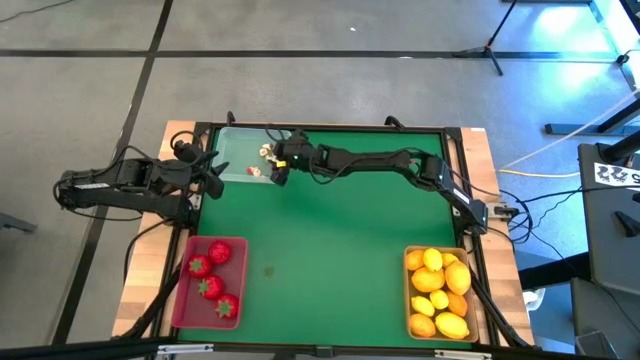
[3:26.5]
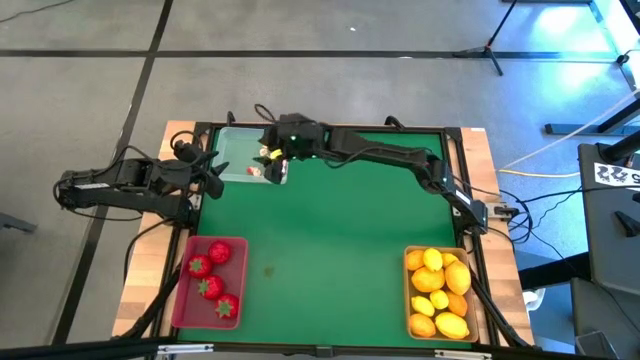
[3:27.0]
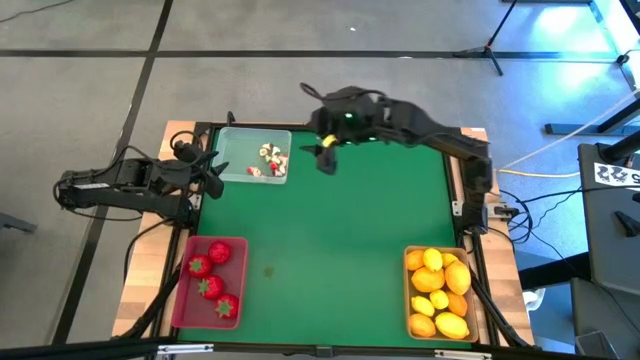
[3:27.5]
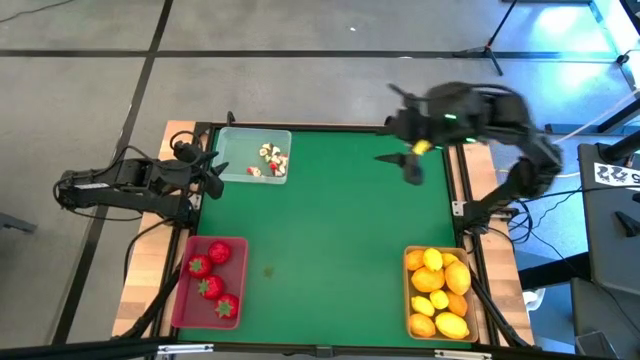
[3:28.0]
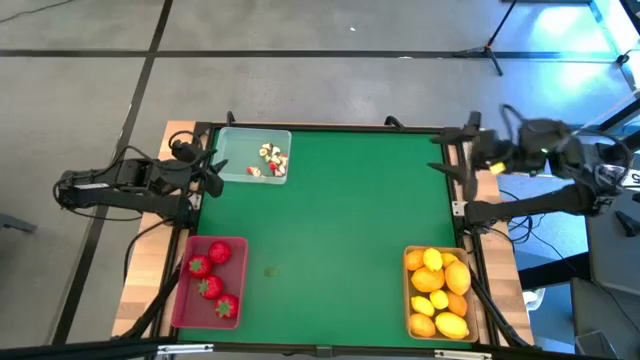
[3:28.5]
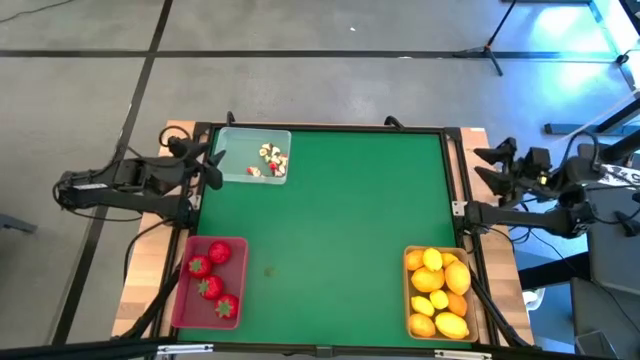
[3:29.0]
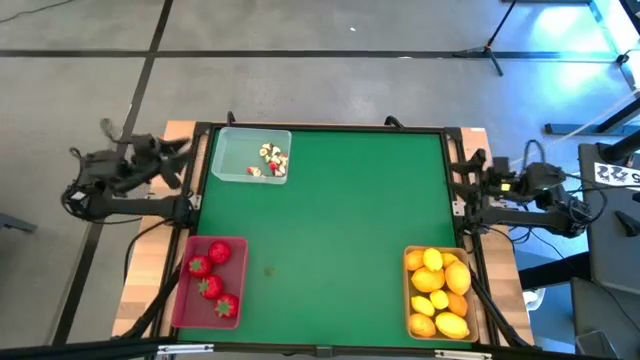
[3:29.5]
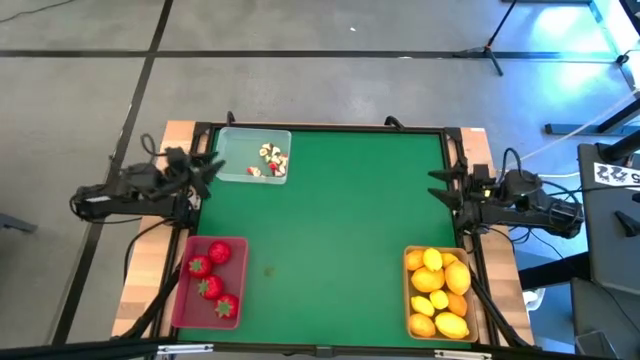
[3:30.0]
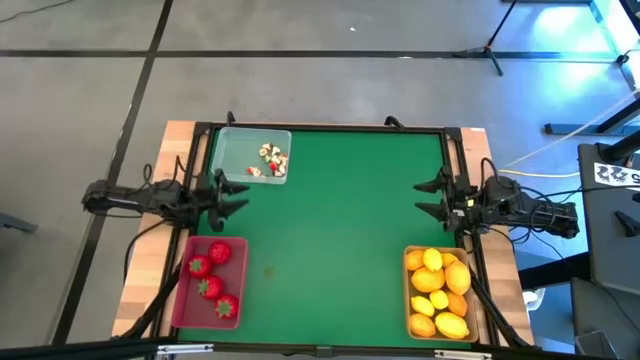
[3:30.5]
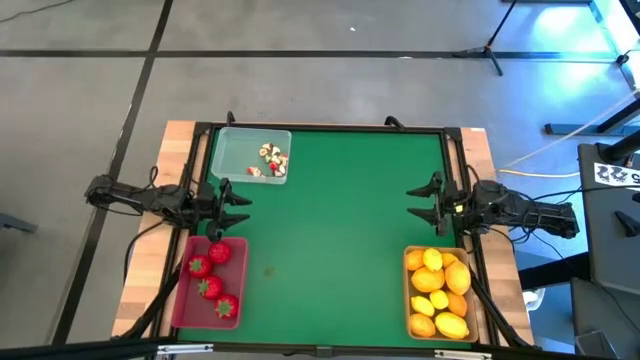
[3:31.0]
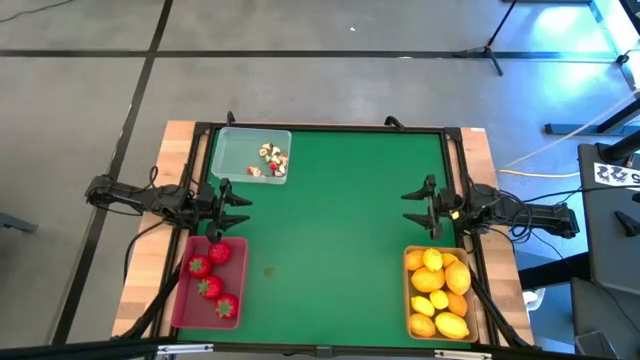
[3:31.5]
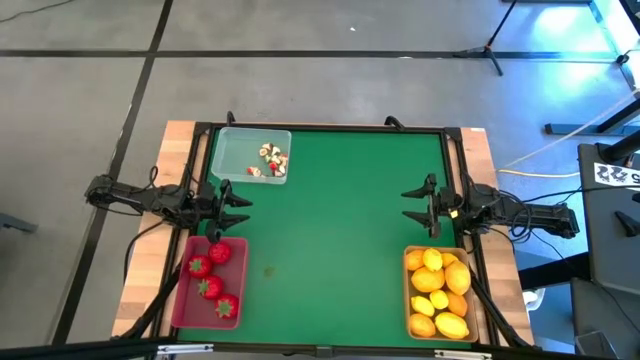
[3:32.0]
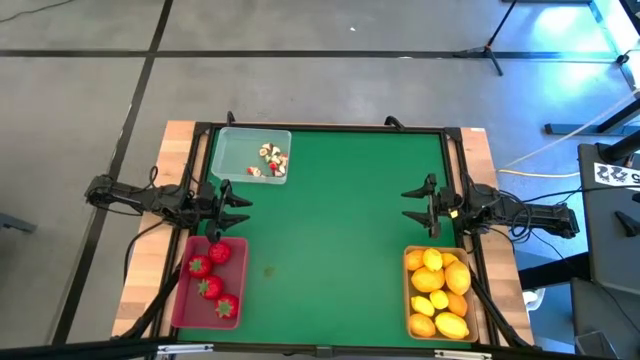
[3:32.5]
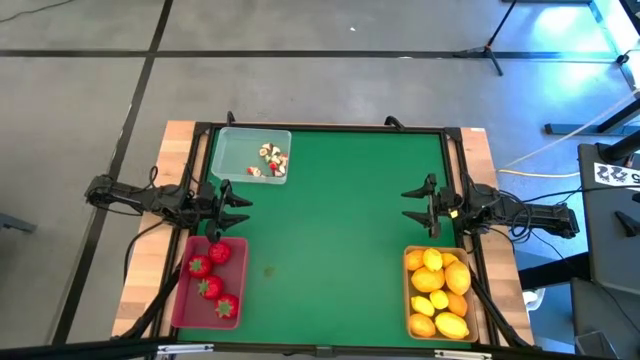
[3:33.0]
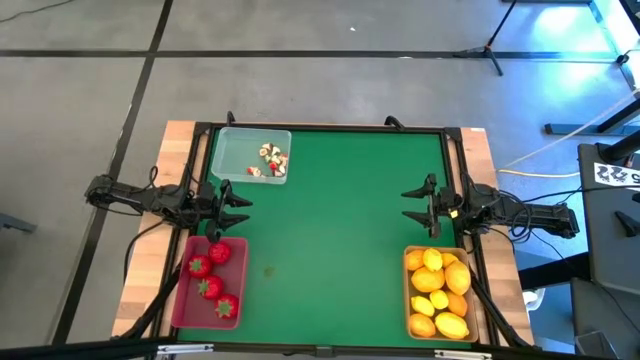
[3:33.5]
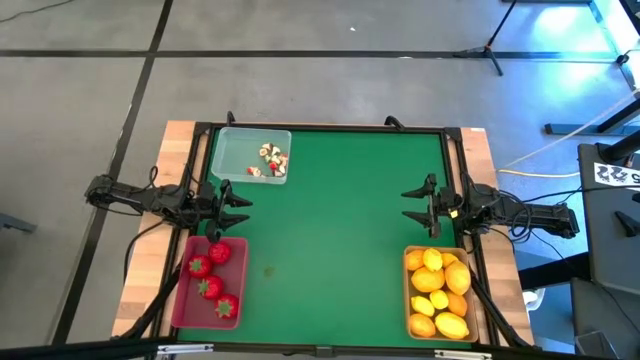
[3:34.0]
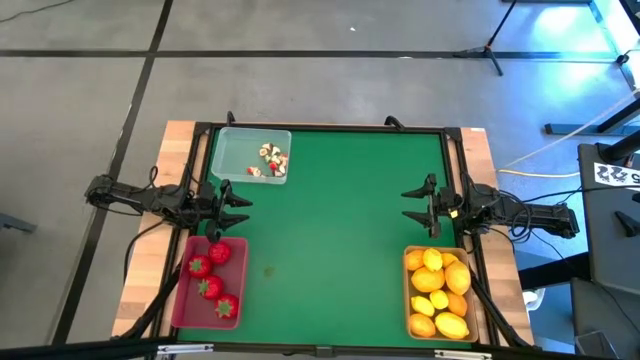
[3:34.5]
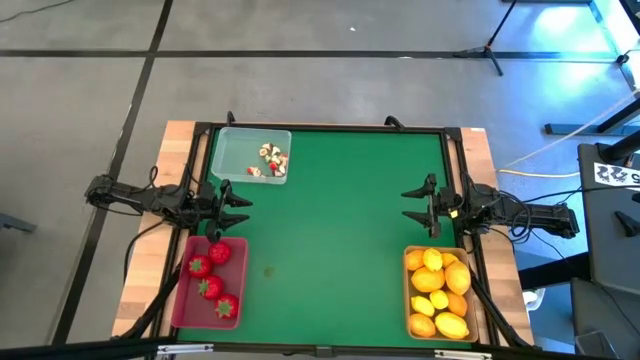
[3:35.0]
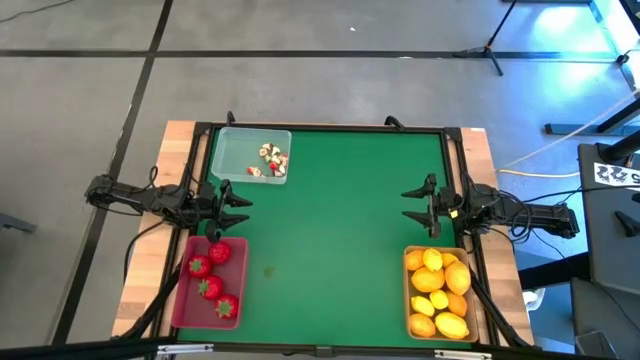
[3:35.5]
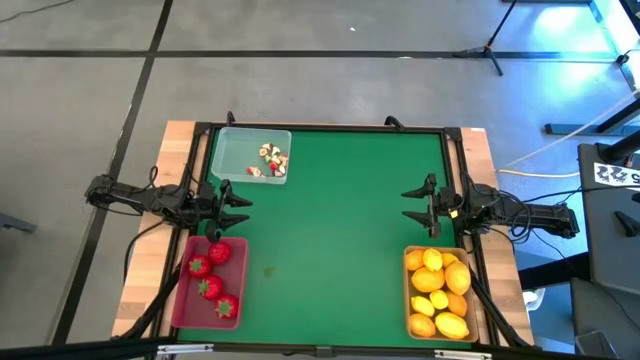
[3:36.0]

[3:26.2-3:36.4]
Task: Sort produce into baskets
Return to Home Position

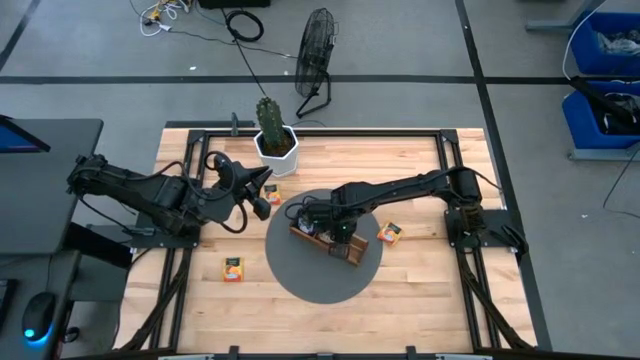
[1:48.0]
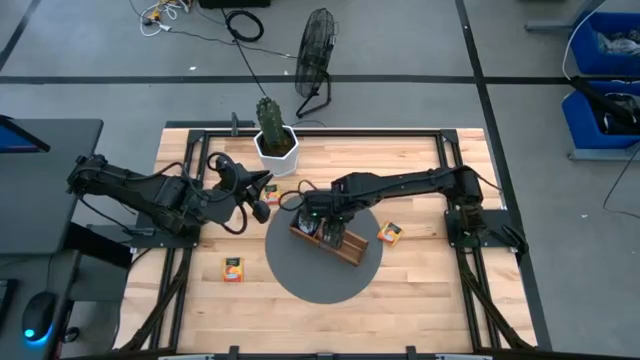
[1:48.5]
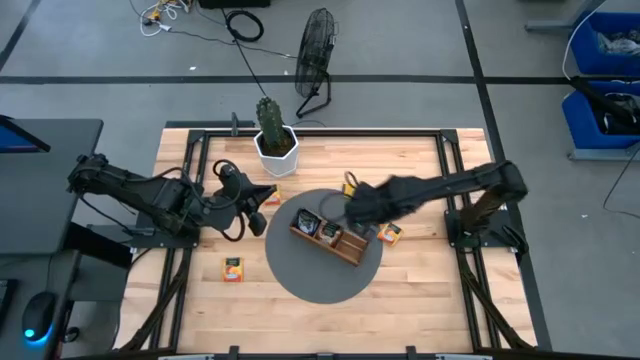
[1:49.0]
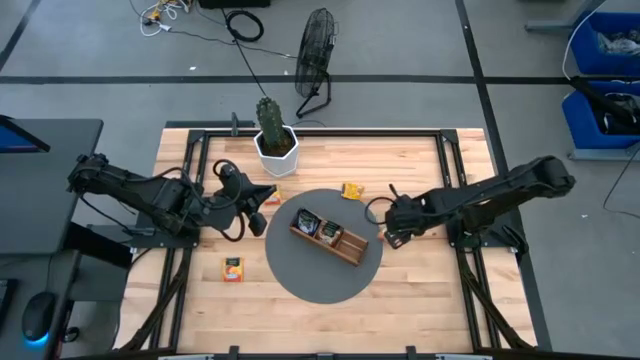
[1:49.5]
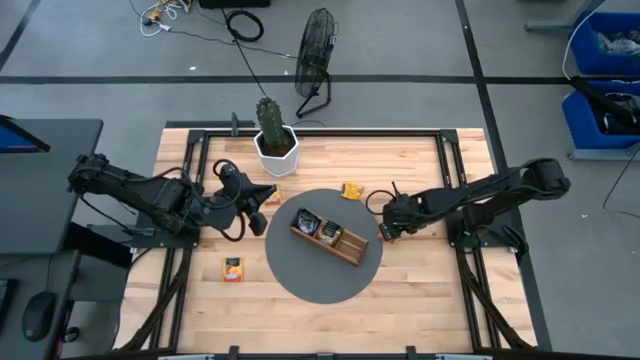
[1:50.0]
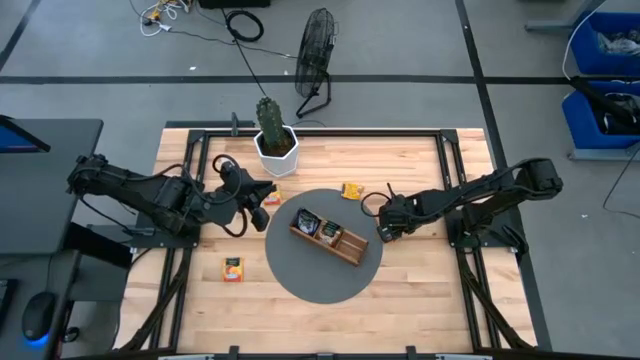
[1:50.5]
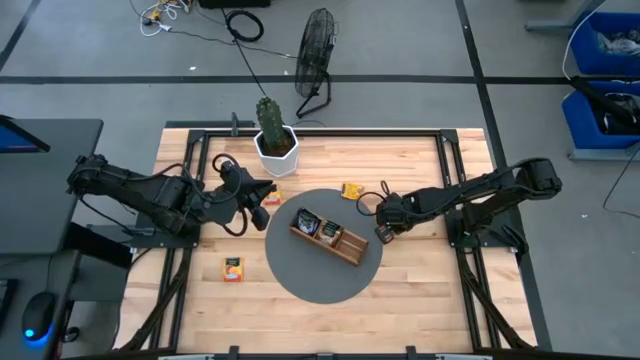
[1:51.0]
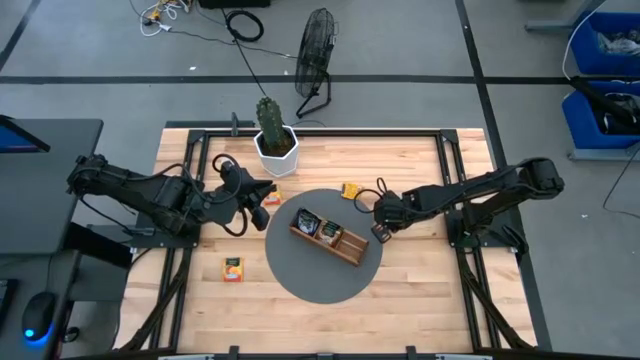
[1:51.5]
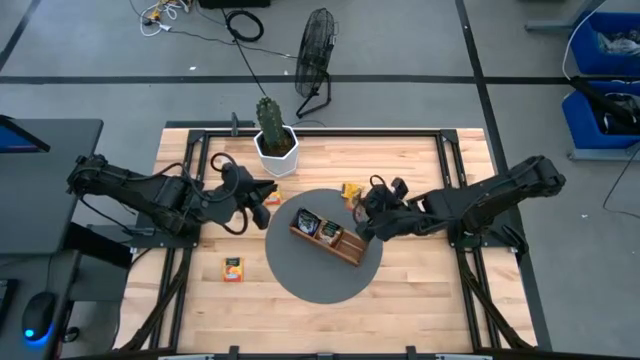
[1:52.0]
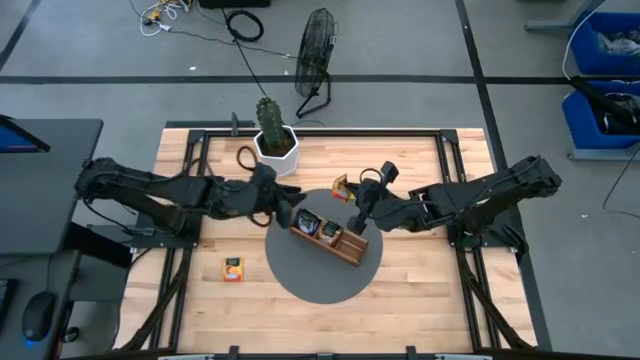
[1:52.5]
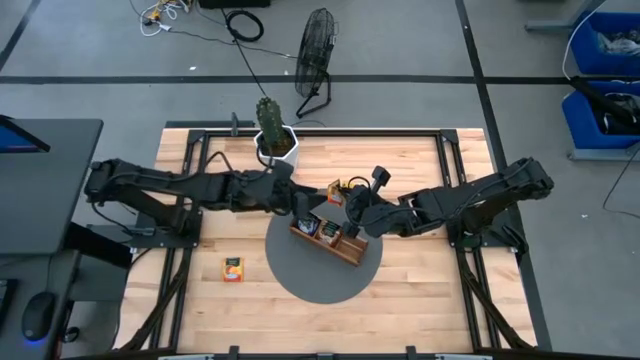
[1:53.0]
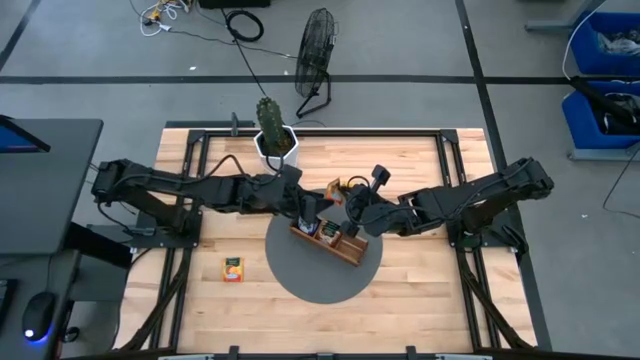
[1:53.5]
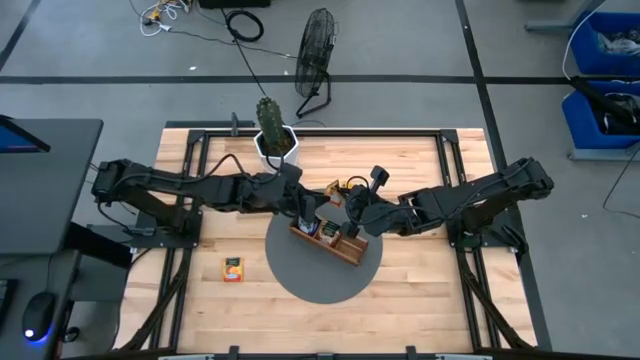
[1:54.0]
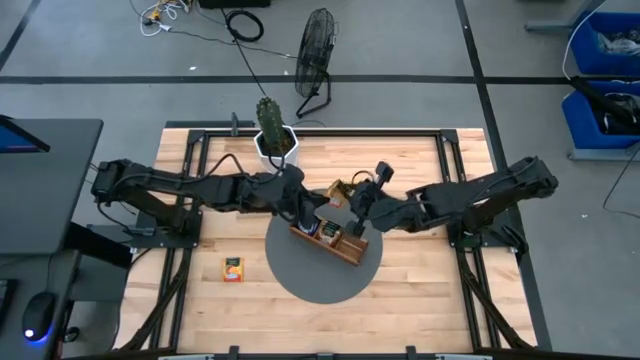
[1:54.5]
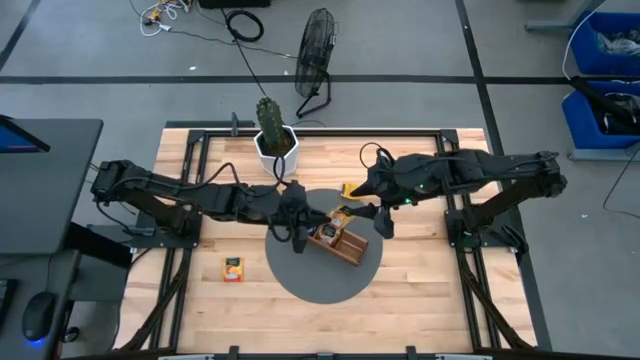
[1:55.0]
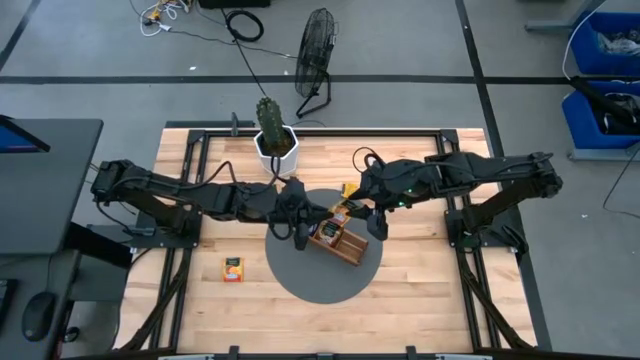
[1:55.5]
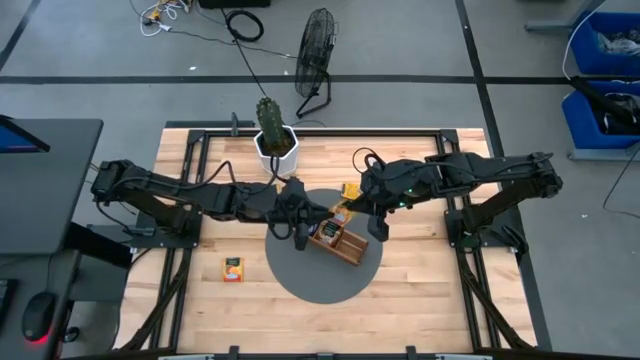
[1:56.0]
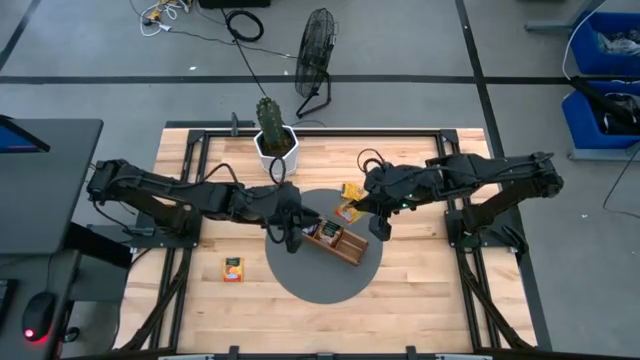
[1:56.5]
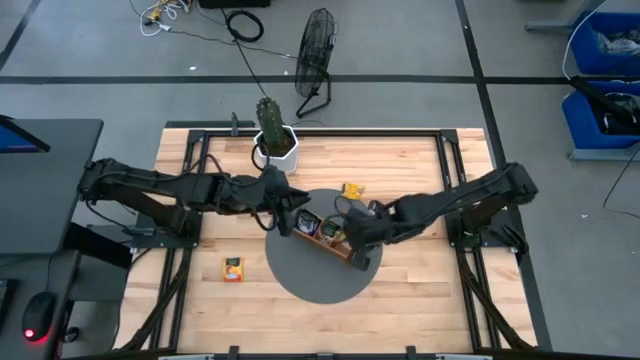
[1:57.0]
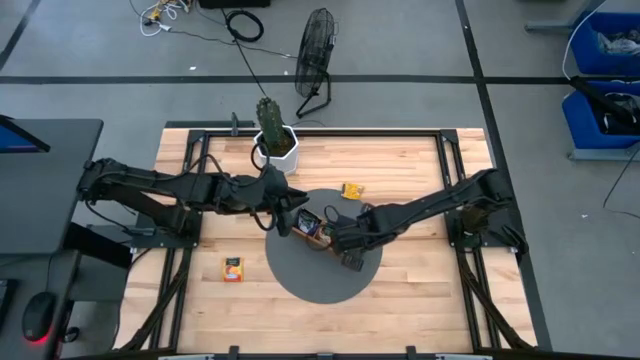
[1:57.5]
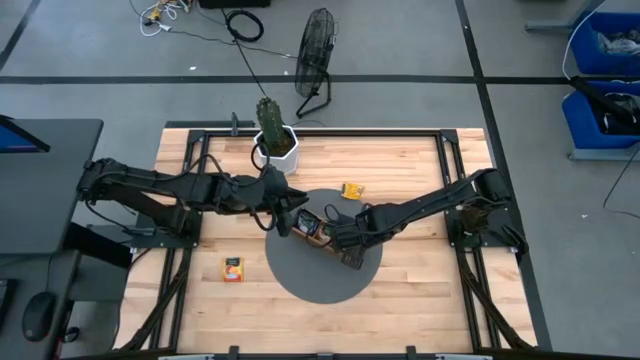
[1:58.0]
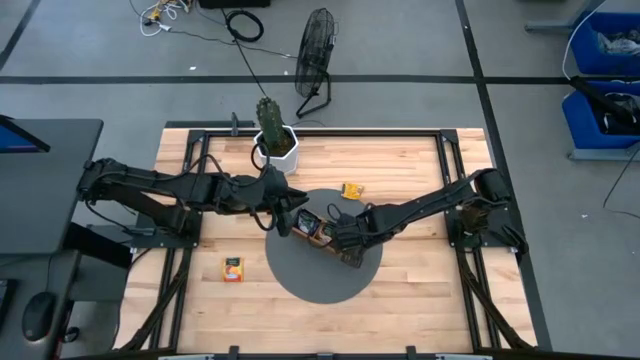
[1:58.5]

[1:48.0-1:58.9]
Task: Pick & Place Tea
Put the orange tea bag into the right section of the wooden organizer

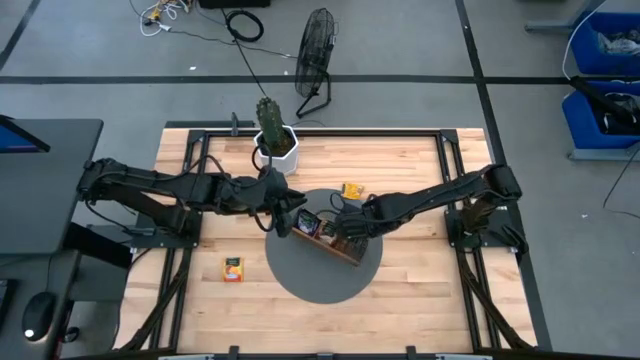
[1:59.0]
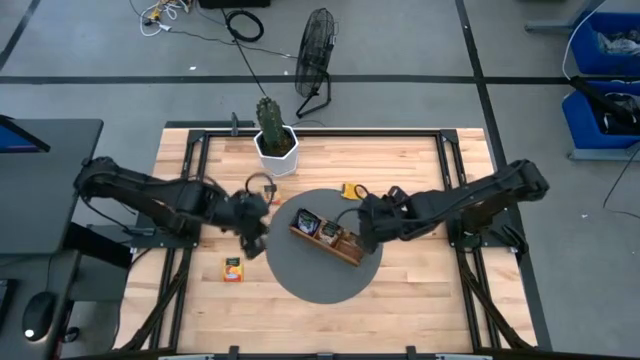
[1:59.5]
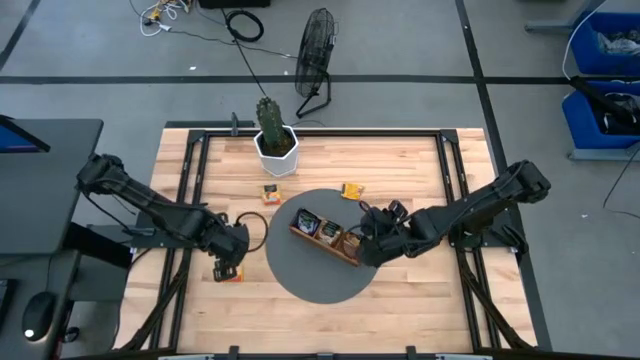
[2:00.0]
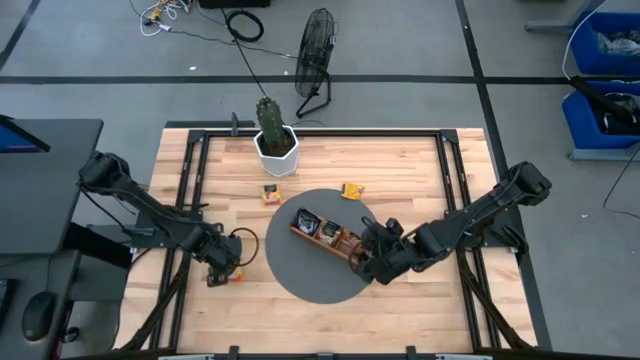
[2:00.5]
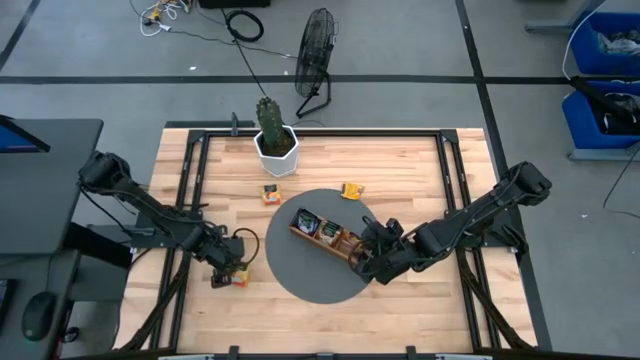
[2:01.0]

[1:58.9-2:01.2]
Put the orange tea bag into the right section of the wooden organizer
